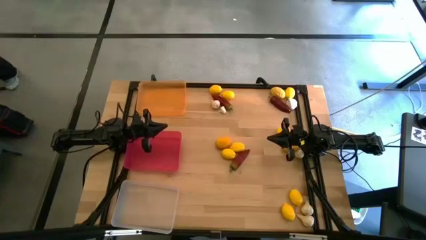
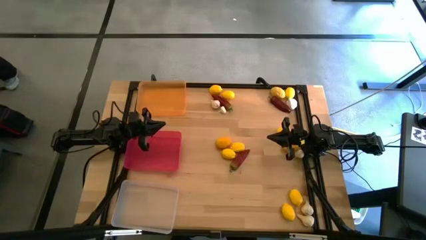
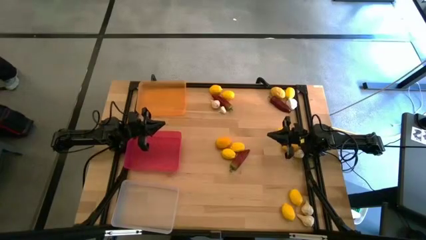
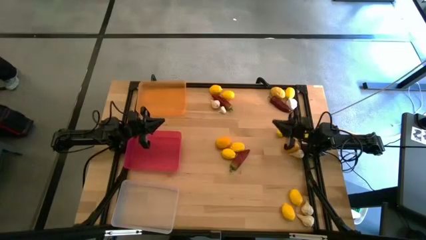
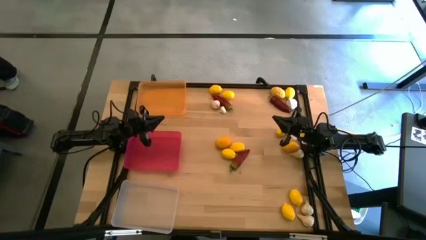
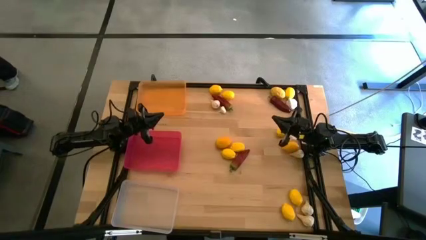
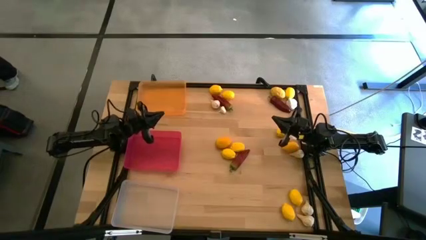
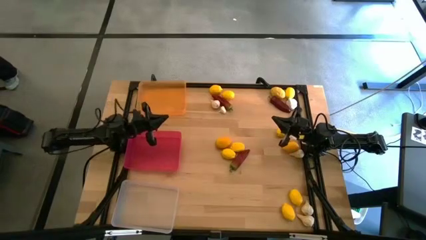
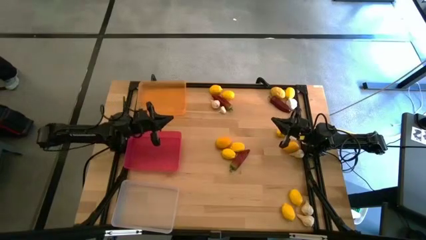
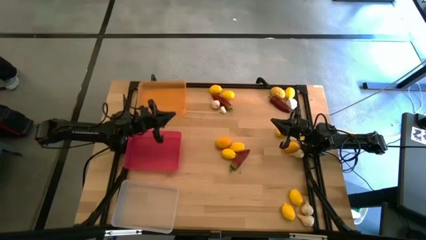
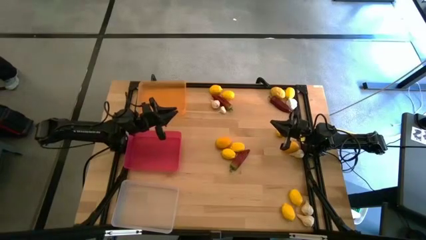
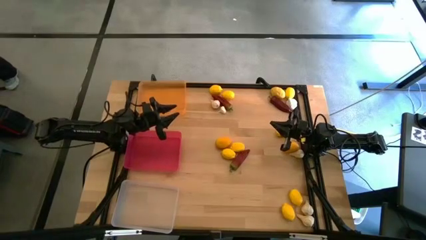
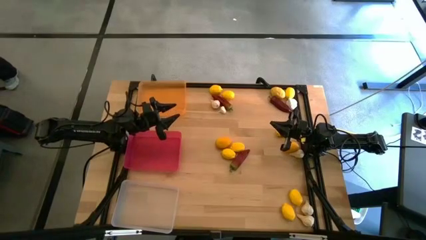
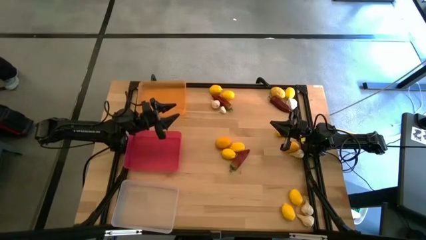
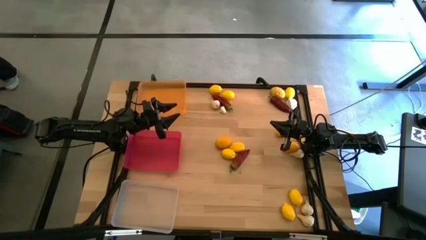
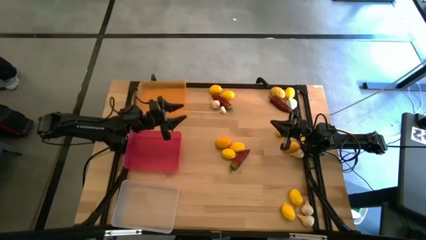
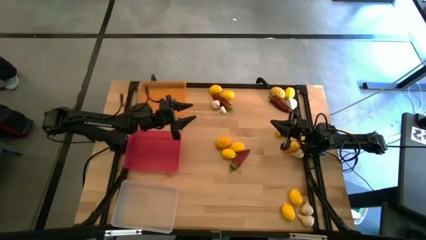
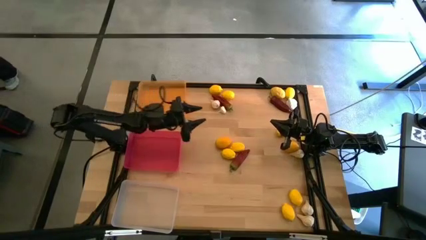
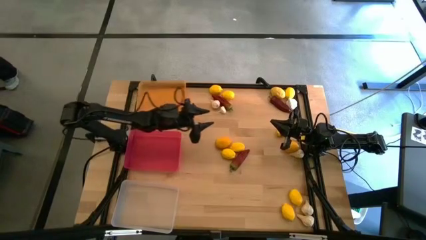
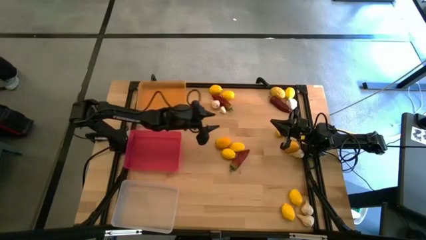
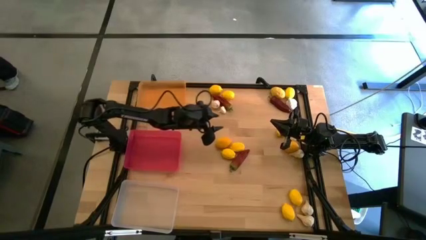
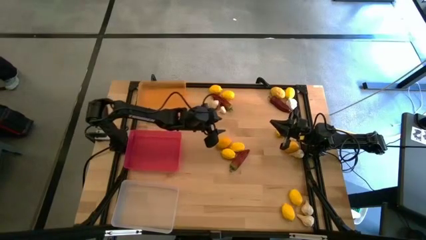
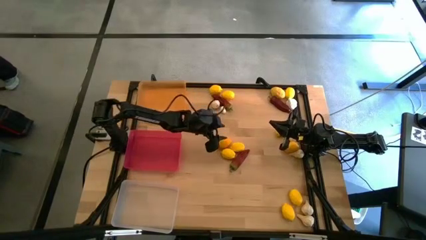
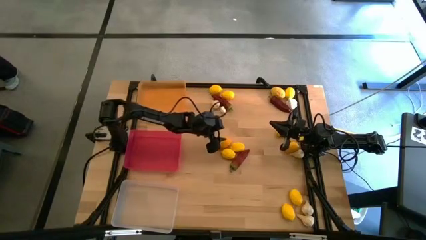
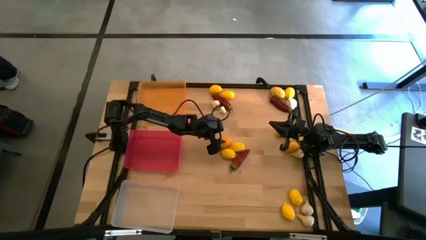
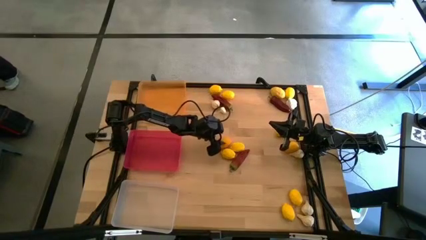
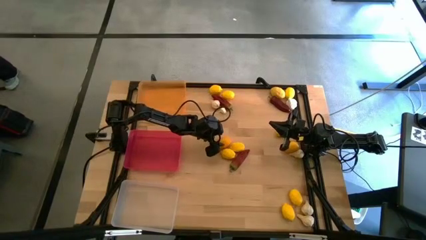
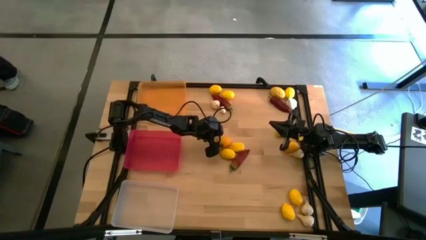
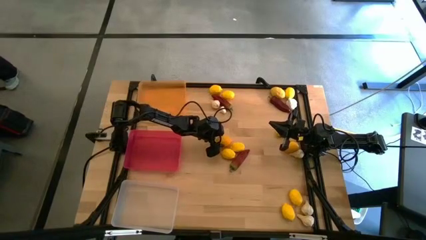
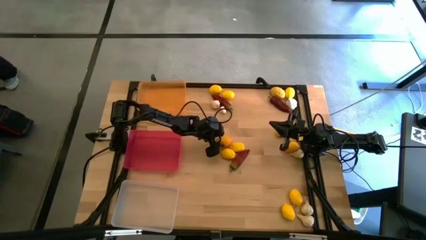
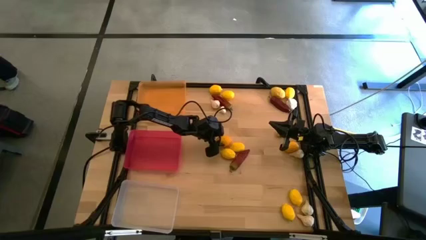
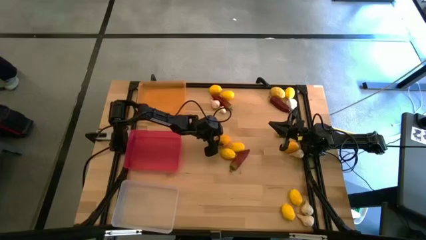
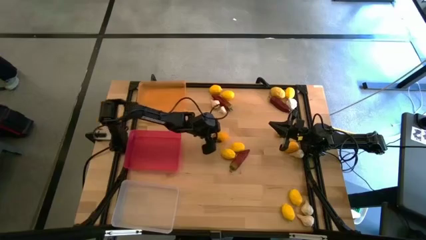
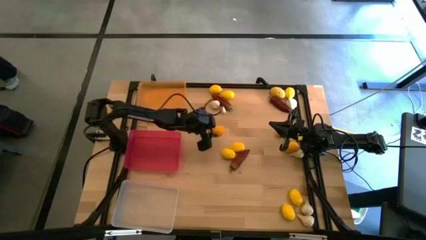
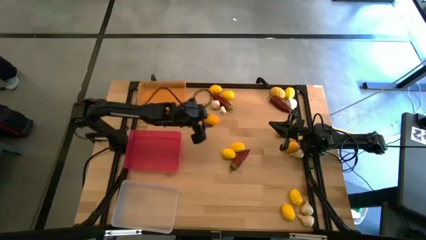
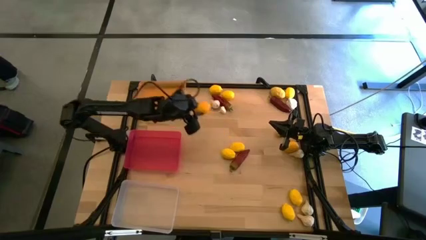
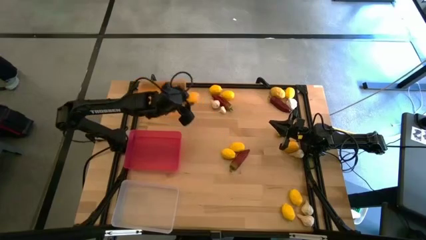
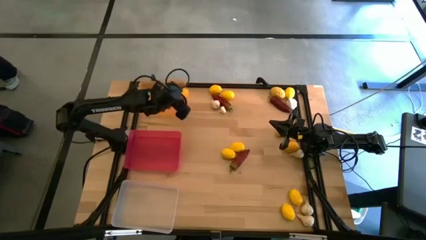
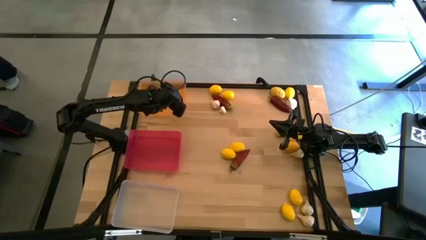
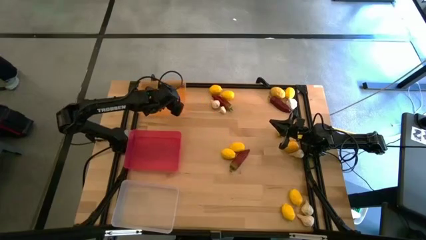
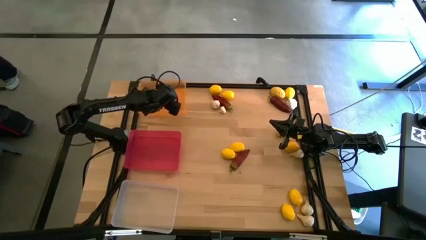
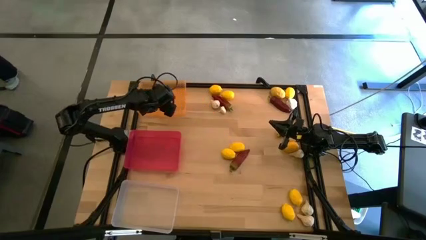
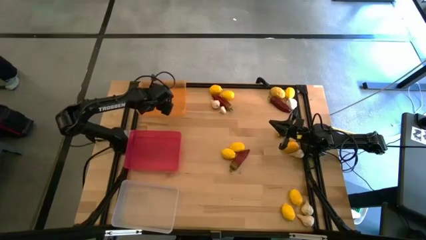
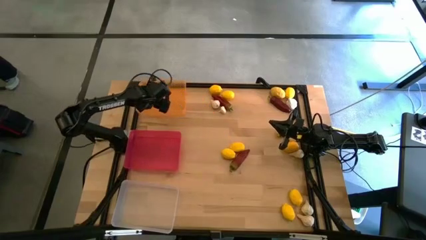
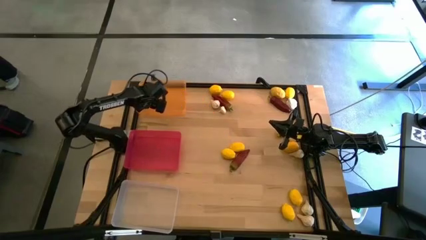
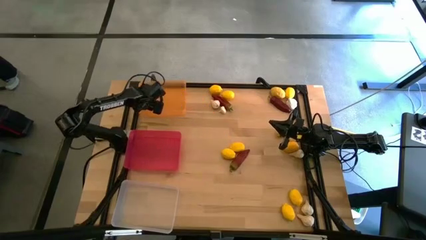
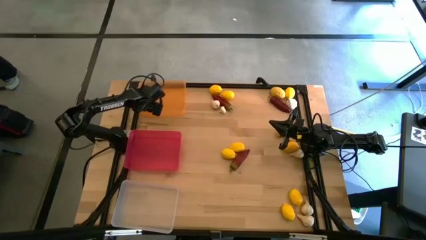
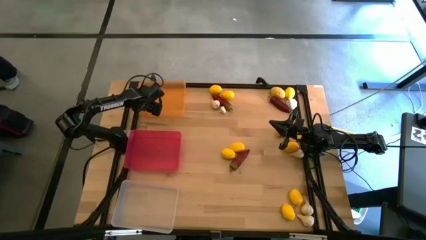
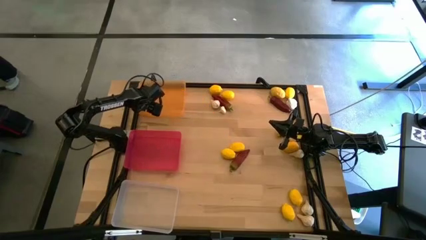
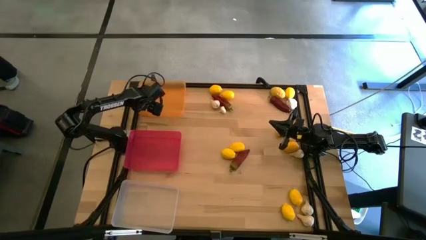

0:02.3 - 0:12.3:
Task: Sort produce into baskets
Put the lemon into the yellow bin

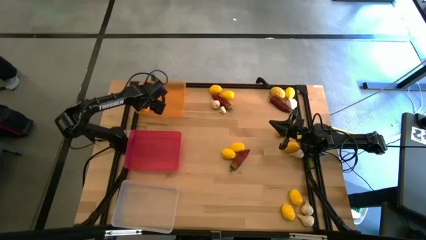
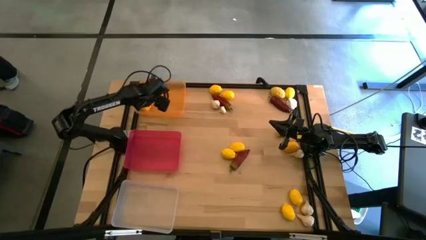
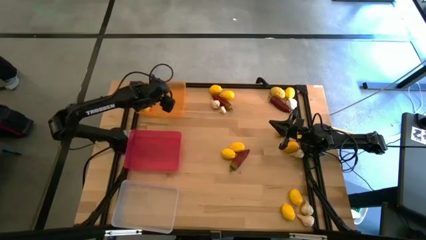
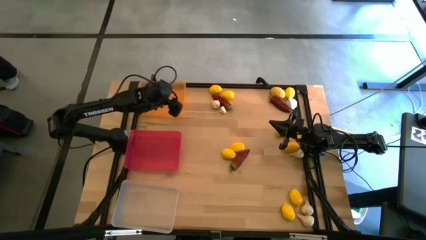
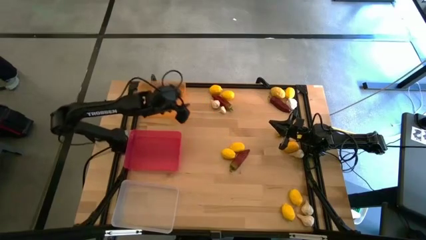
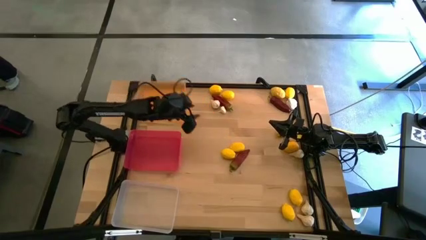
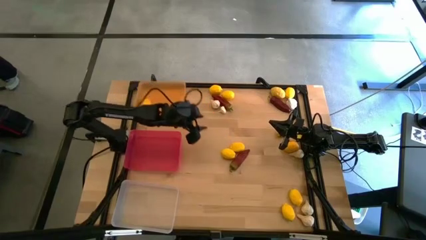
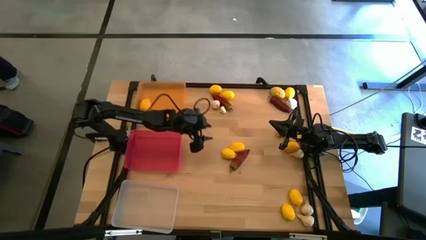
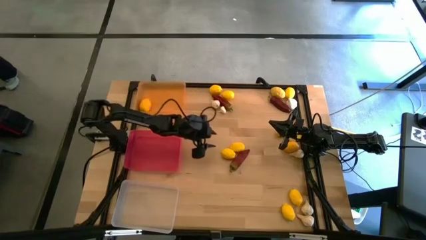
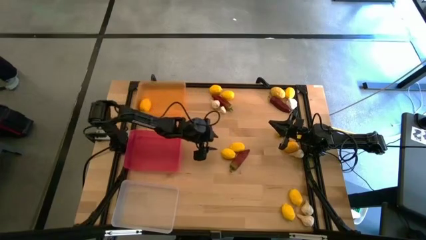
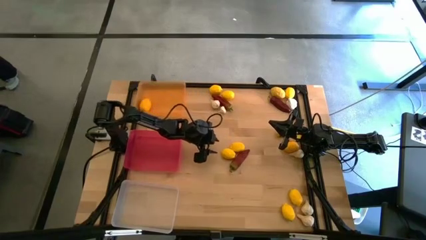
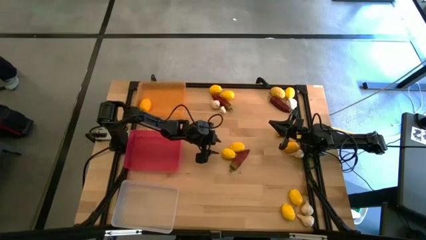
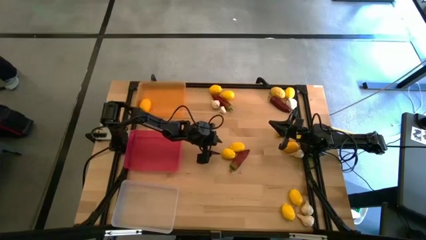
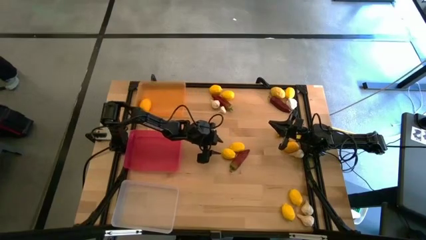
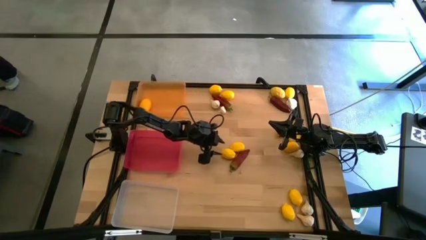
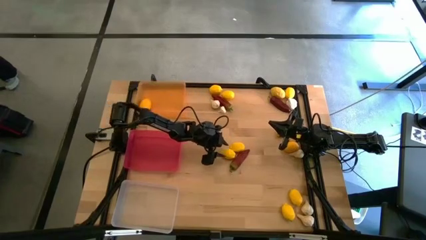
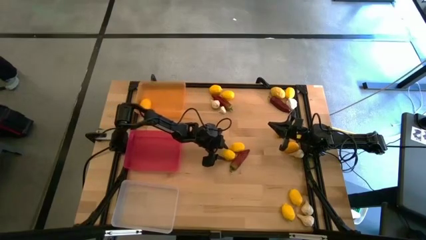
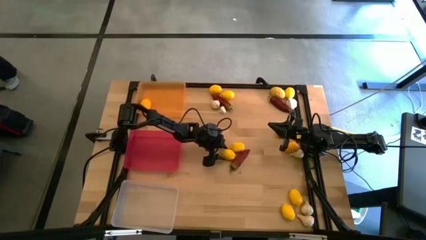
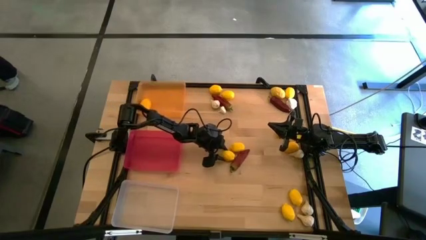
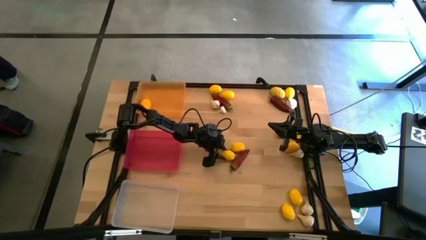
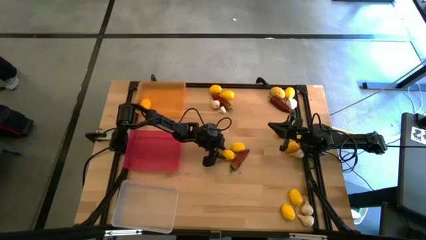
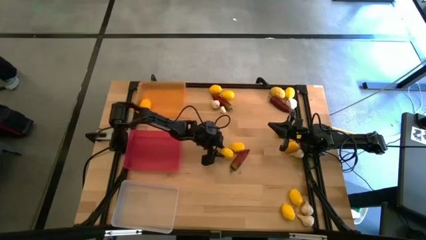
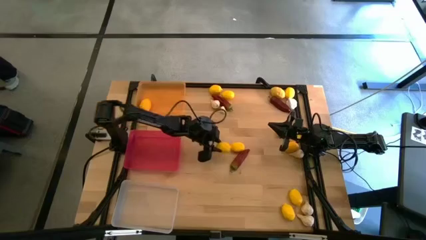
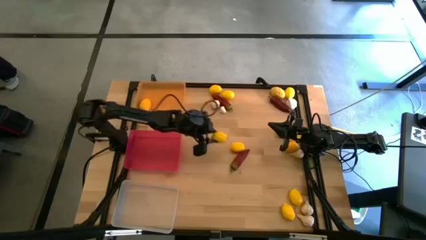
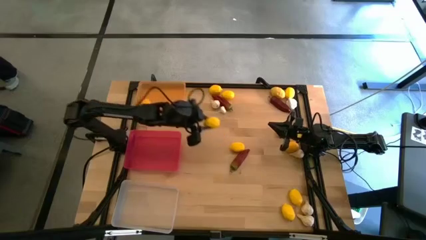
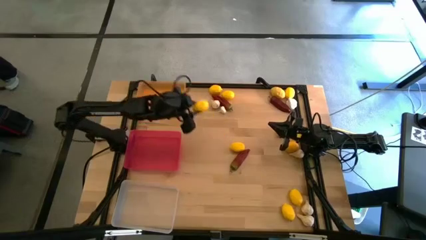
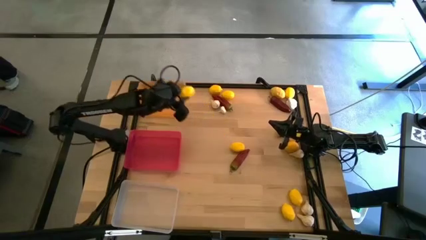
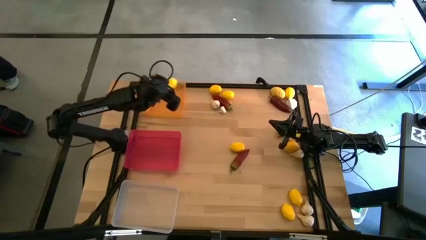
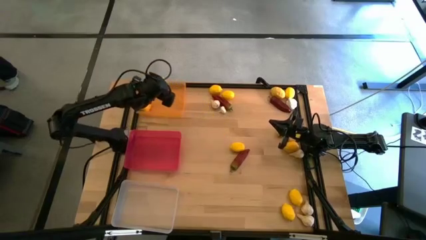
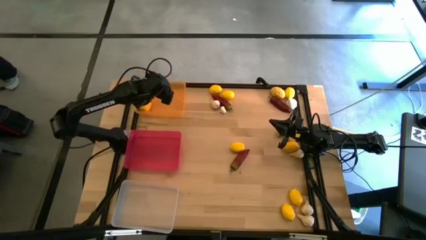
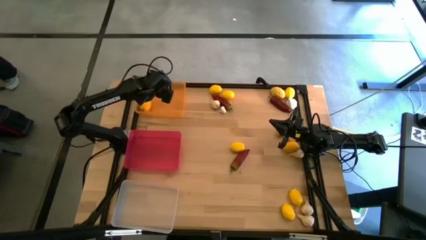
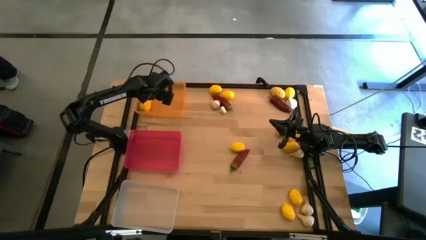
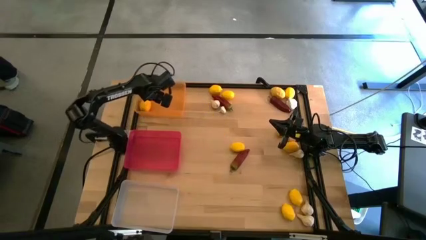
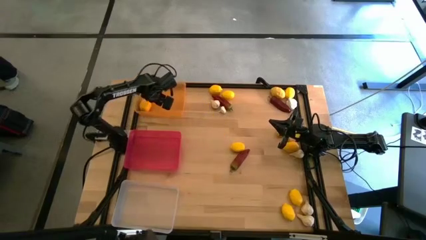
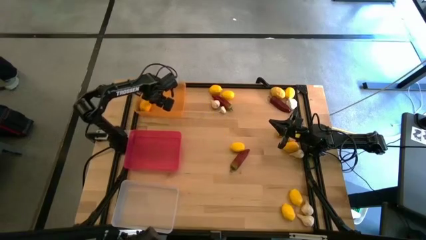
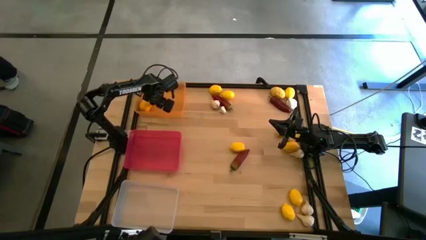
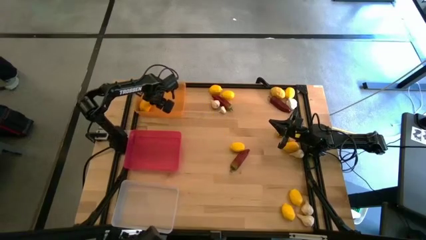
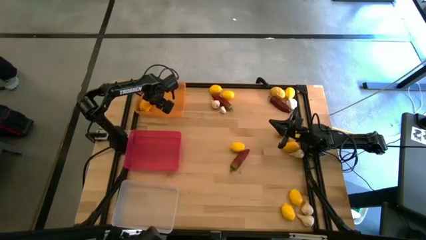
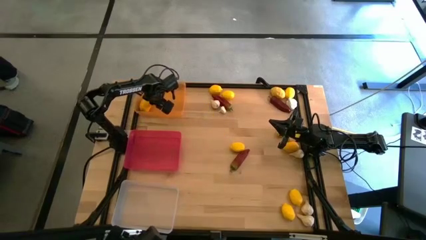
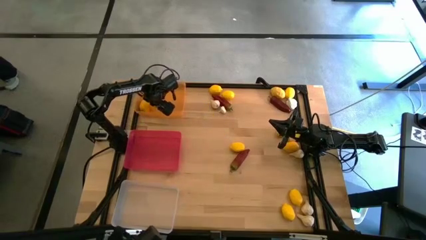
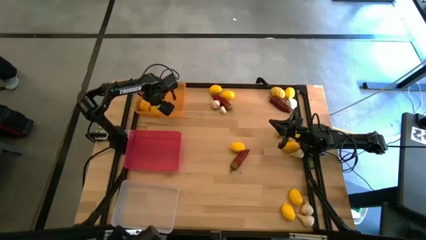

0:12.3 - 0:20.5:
Put the lemon into the yellow bin
